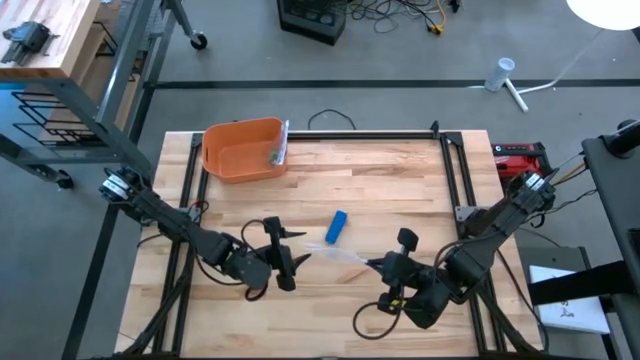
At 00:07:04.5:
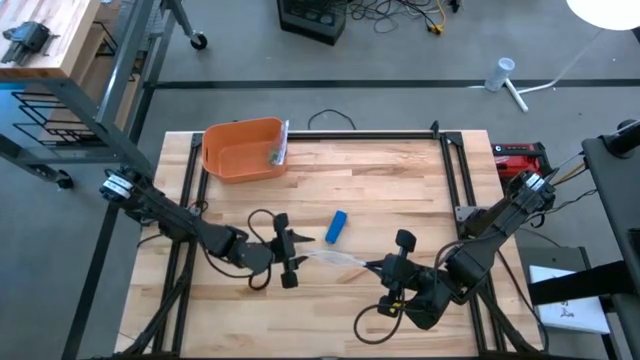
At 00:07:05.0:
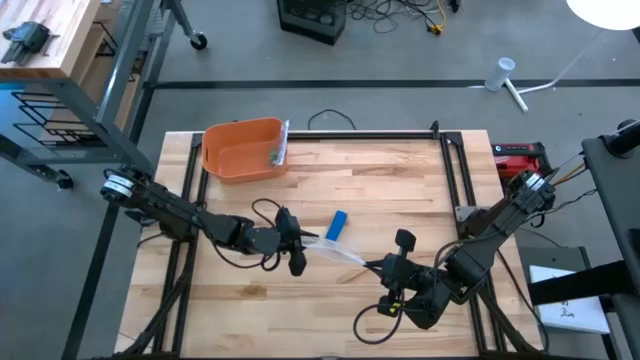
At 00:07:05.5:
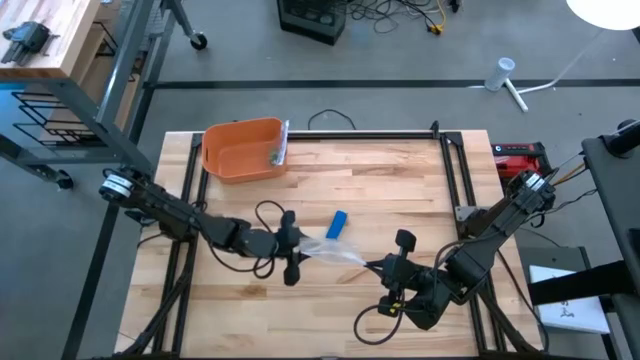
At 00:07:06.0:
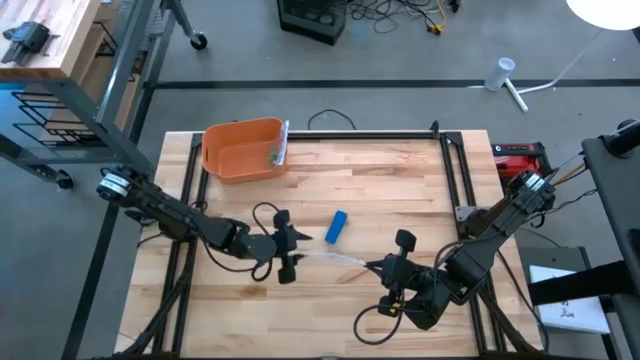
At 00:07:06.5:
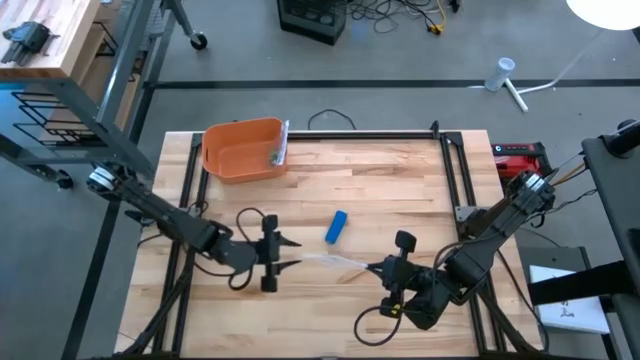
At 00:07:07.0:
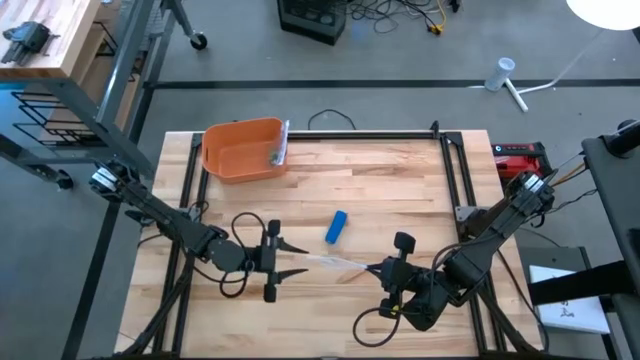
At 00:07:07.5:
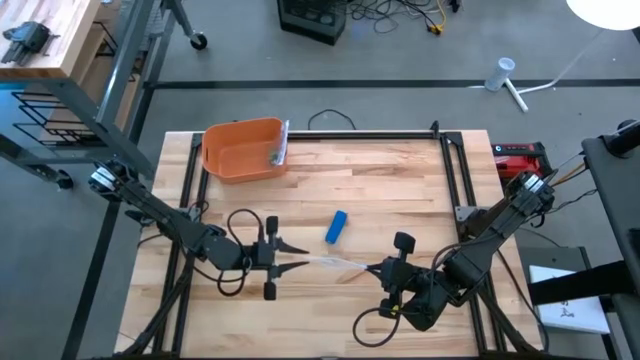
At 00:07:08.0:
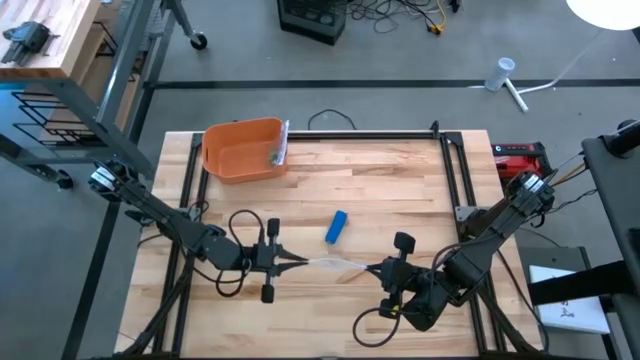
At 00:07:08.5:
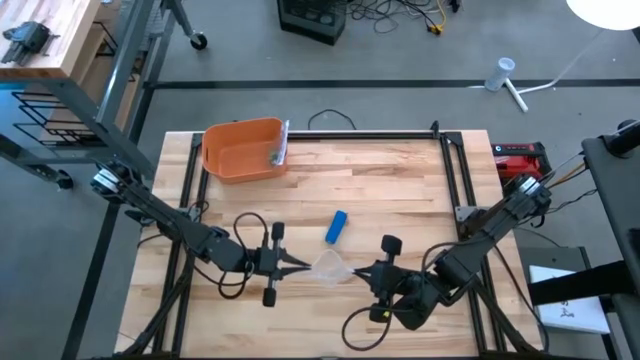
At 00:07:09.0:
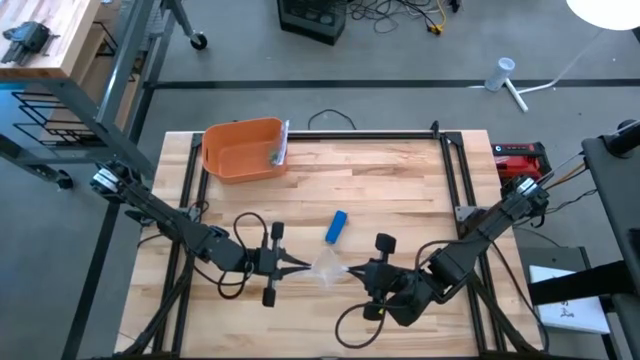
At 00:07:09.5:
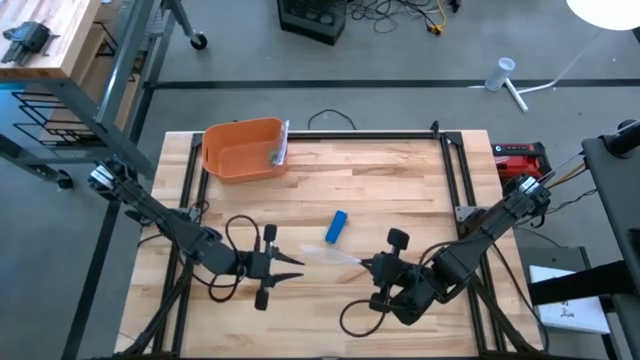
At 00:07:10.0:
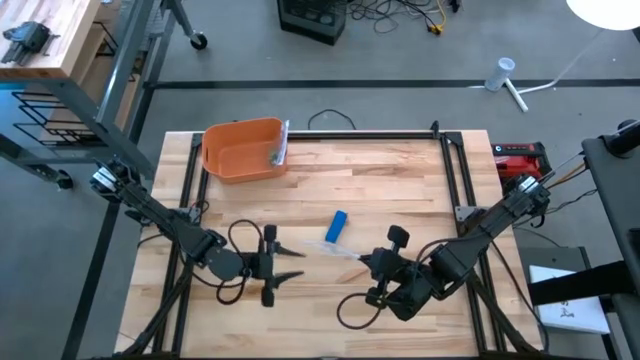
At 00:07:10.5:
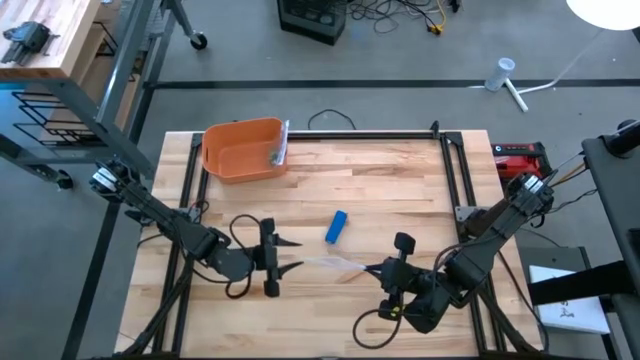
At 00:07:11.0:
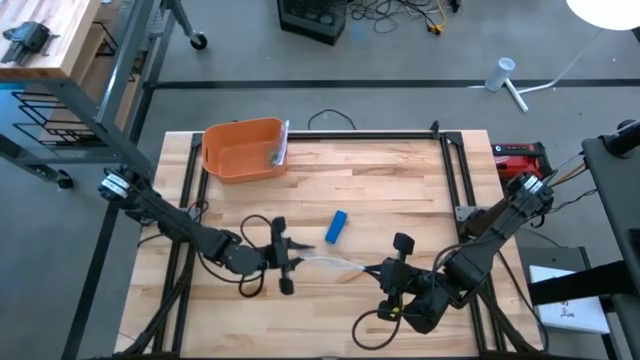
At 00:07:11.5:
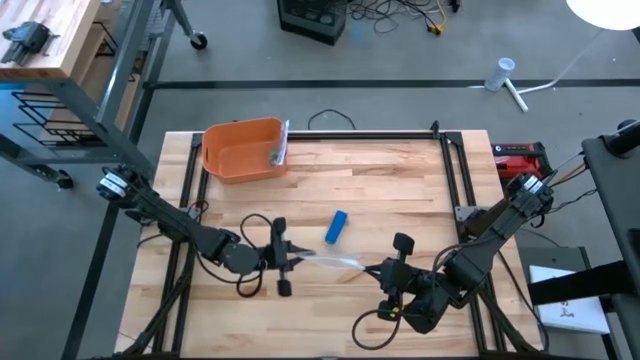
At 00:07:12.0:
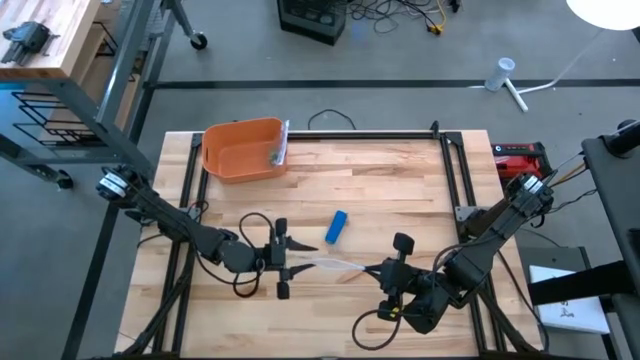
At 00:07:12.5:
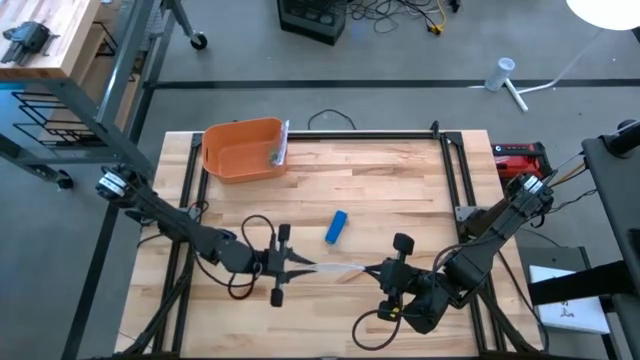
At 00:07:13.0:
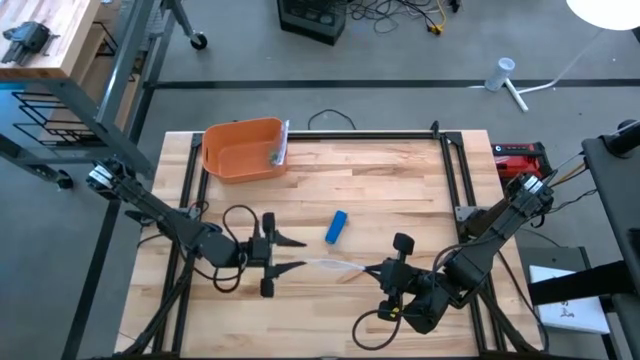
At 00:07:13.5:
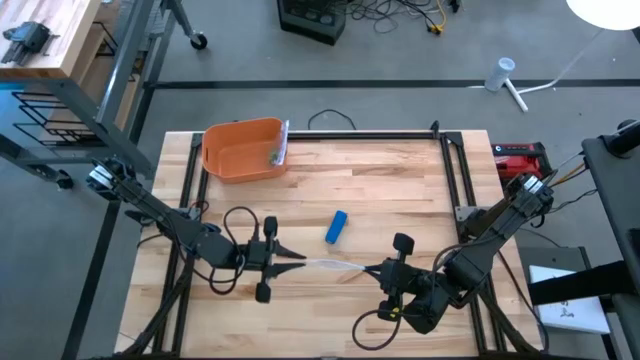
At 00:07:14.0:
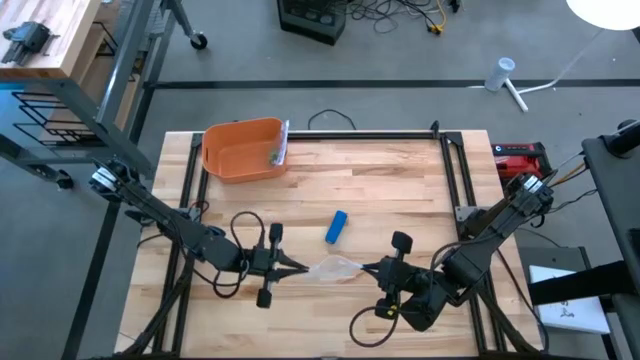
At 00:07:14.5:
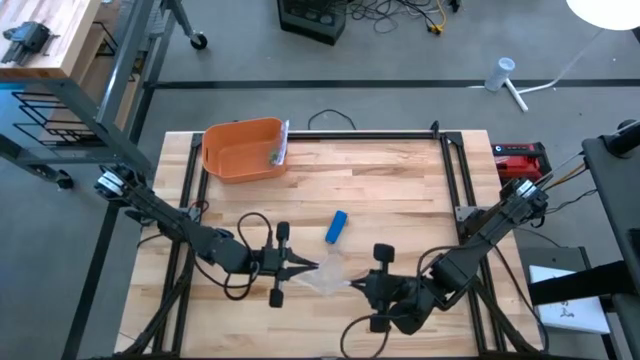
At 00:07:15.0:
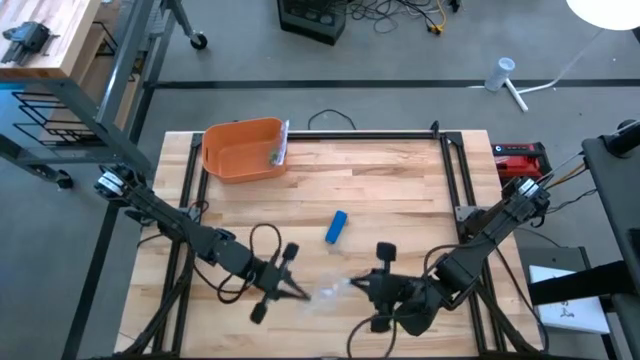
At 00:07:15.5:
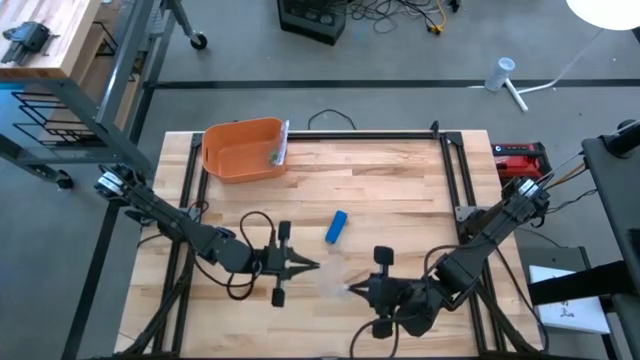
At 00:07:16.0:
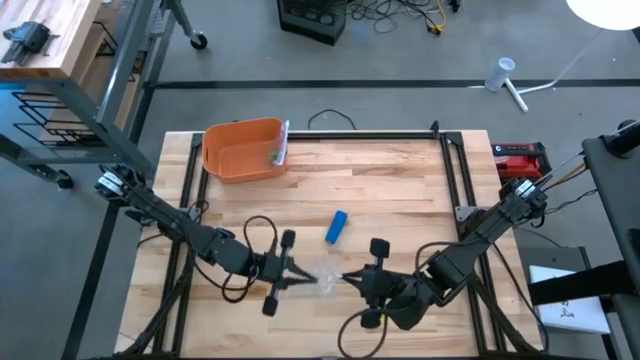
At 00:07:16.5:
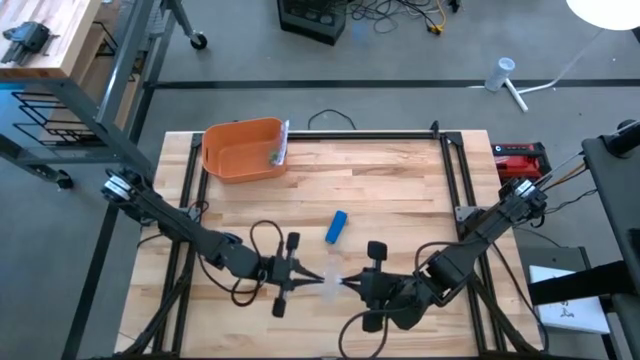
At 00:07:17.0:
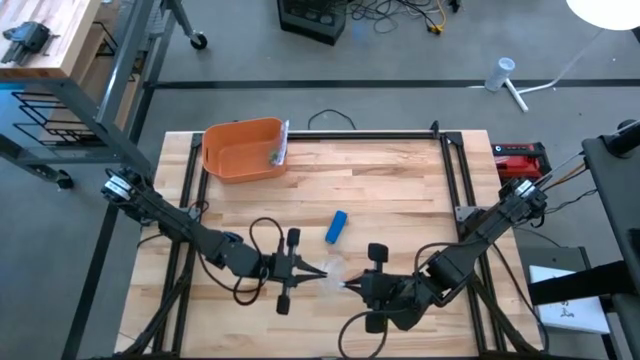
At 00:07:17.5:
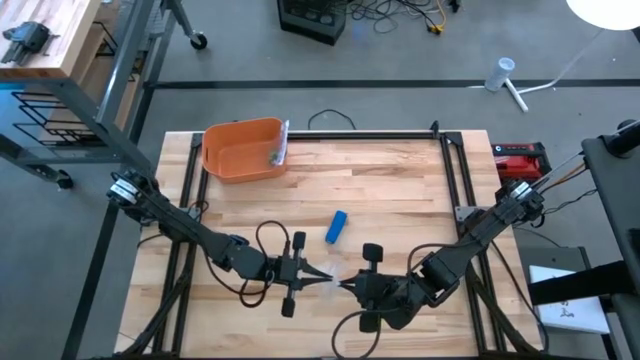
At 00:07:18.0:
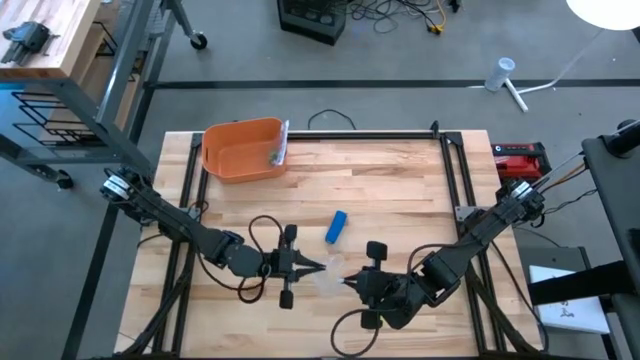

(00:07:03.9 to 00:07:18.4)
Task: Roll bandage
Open the transparent zip bag

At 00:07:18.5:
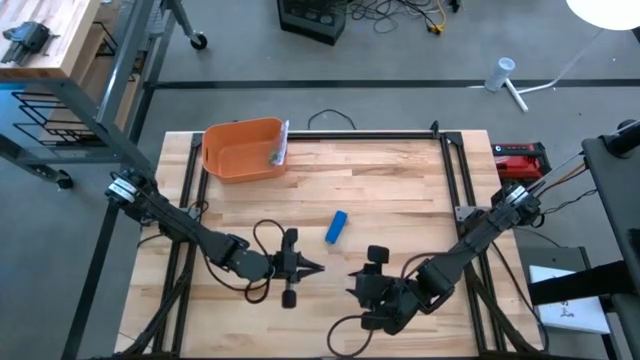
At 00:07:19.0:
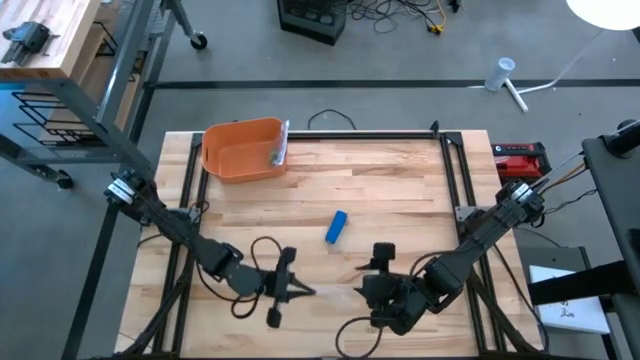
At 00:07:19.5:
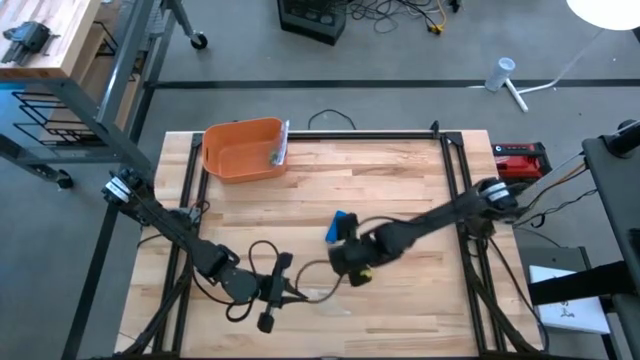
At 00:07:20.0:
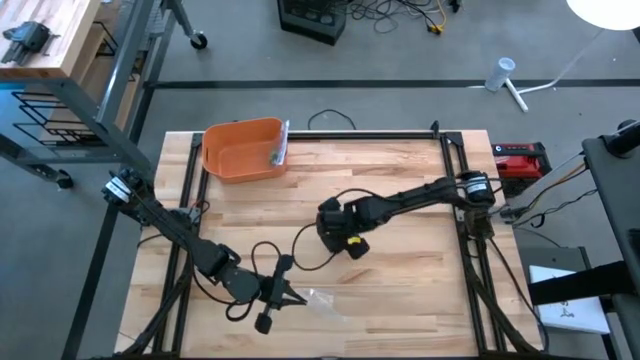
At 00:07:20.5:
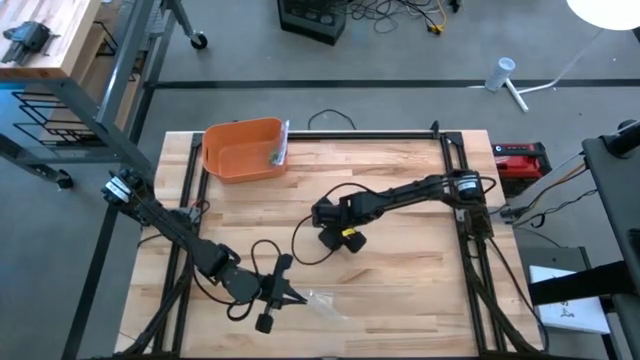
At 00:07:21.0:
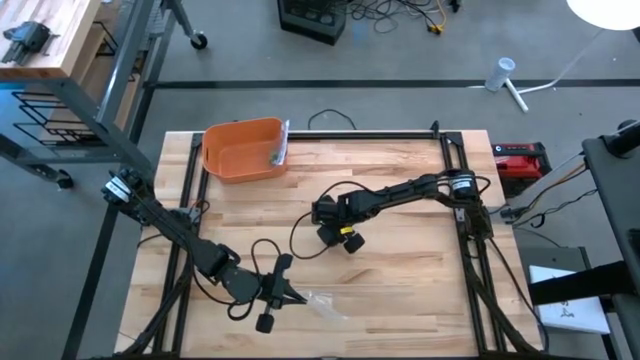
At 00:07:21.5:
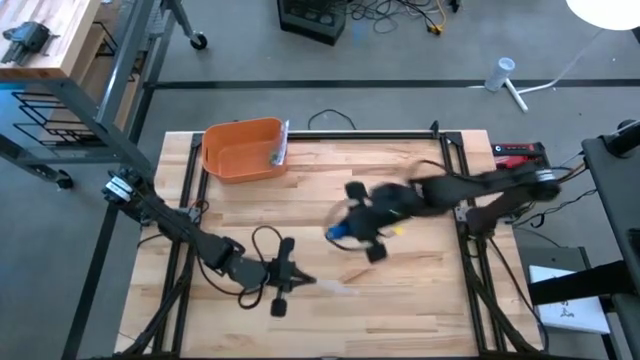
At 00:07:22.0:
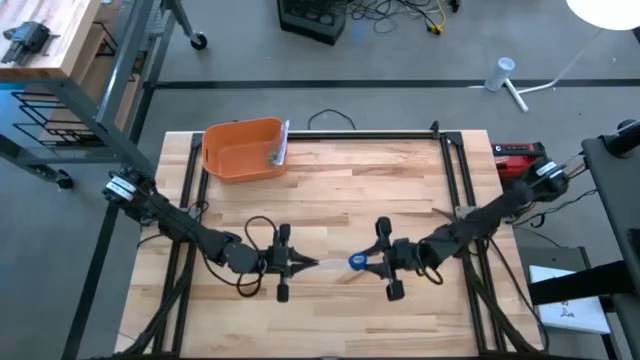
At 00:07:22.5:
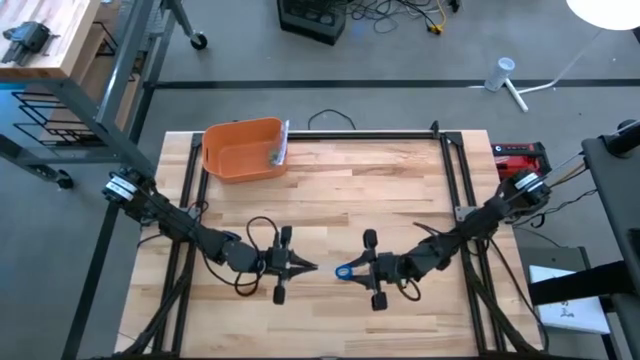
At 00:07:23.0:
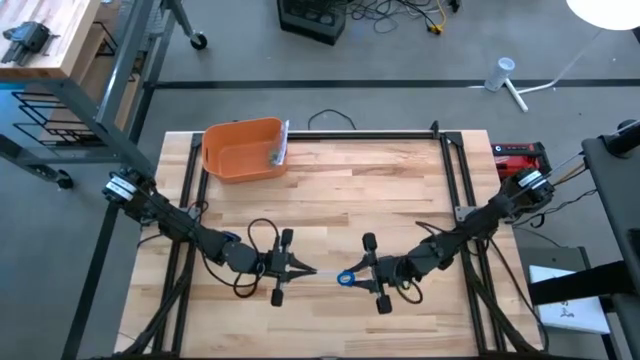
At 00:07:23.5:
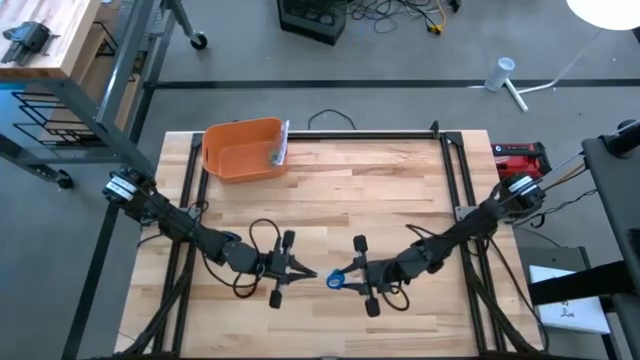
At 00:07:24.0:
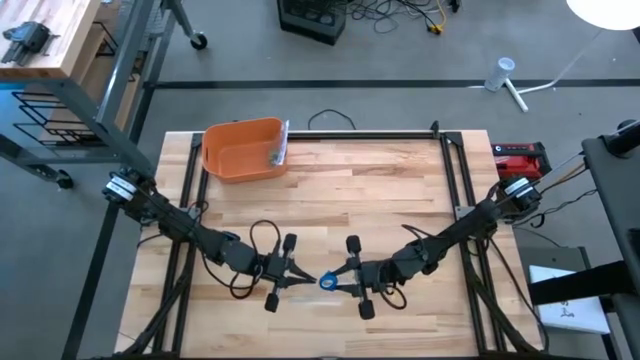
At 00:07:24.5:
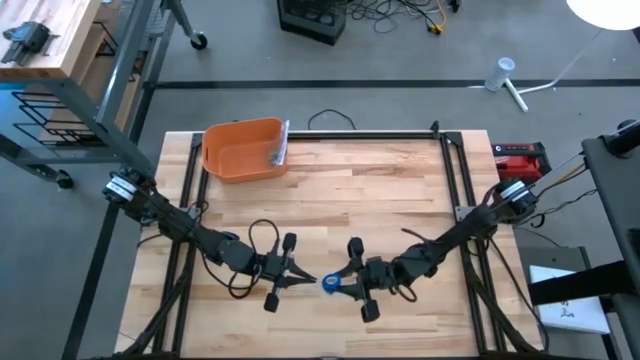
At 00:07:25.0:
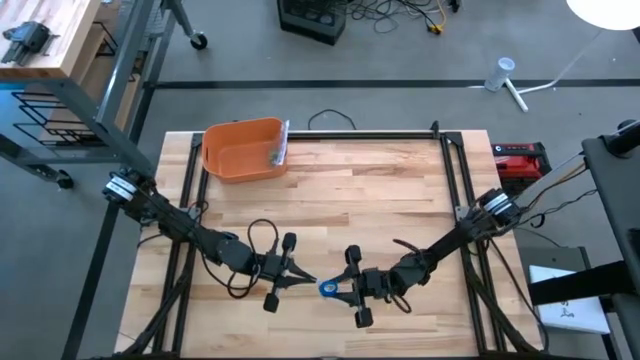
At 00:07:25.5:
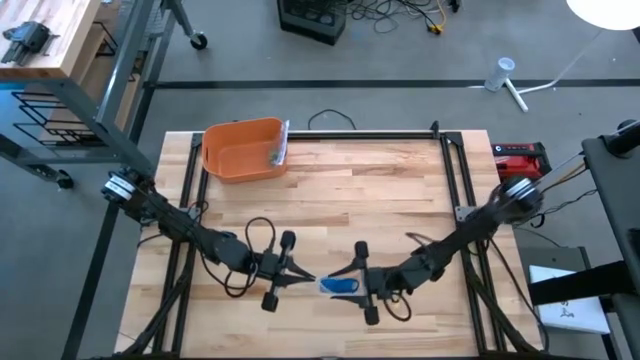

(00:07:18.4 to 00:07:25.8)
Put the blue bandage into the transparent zip bag
